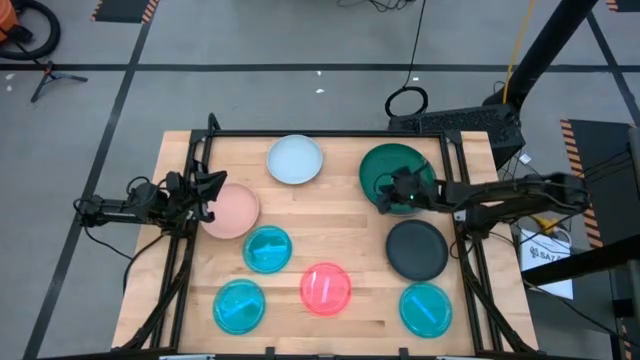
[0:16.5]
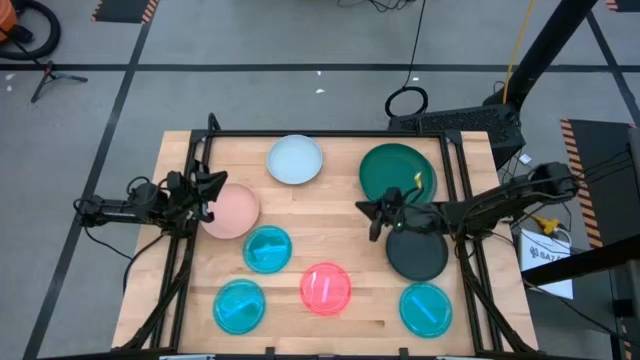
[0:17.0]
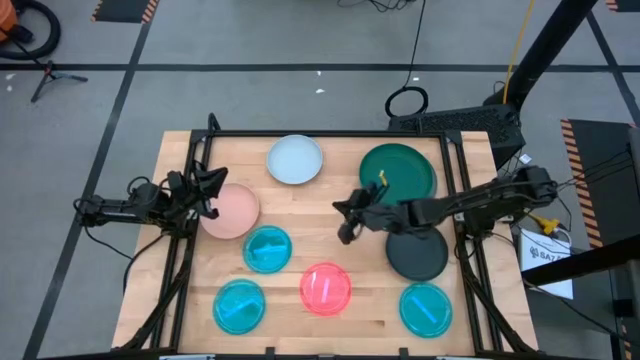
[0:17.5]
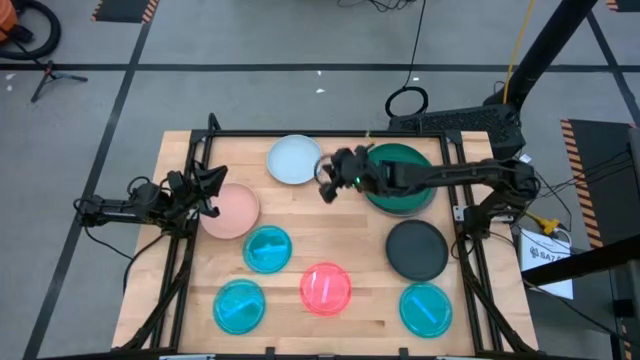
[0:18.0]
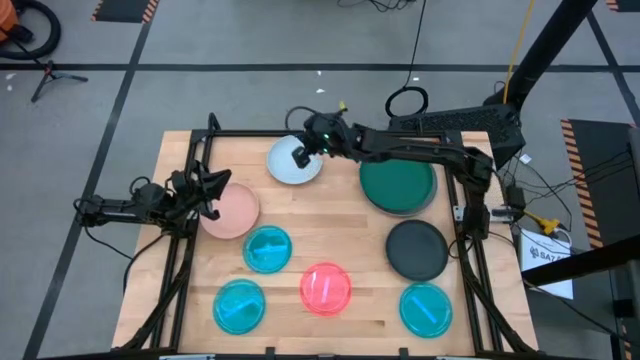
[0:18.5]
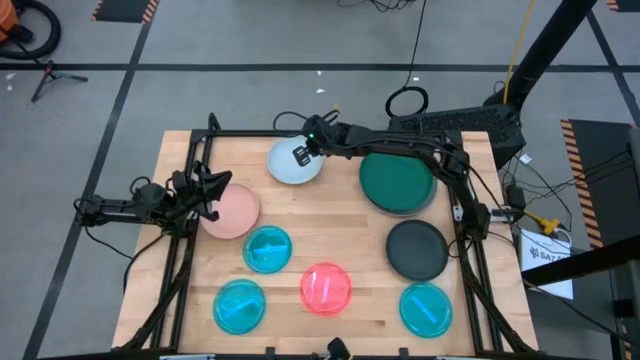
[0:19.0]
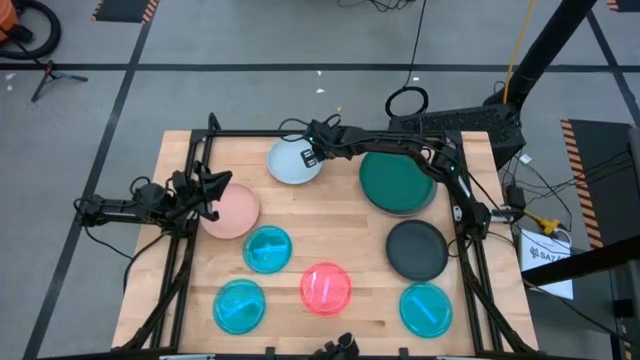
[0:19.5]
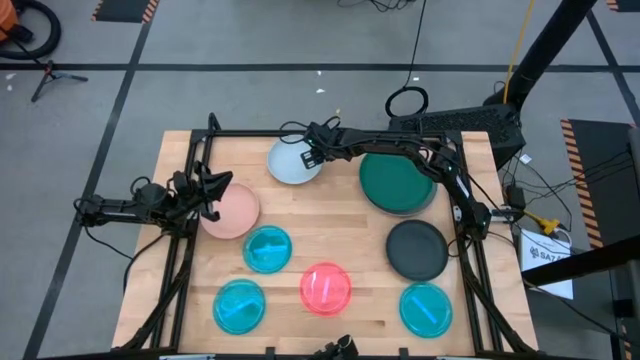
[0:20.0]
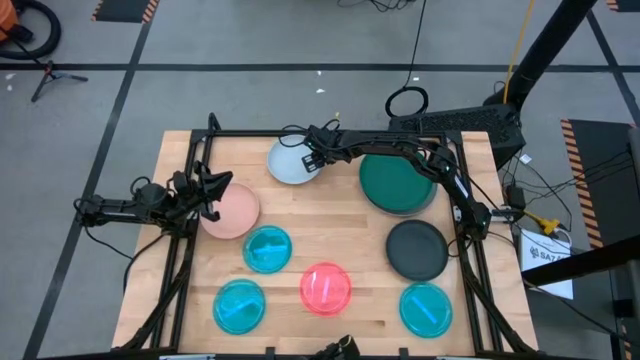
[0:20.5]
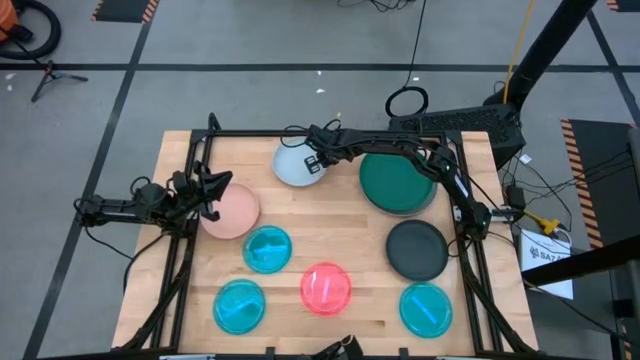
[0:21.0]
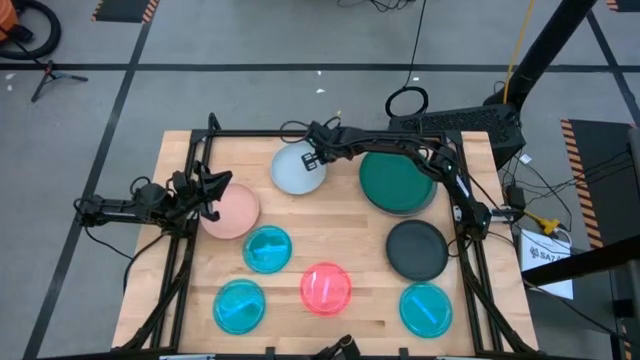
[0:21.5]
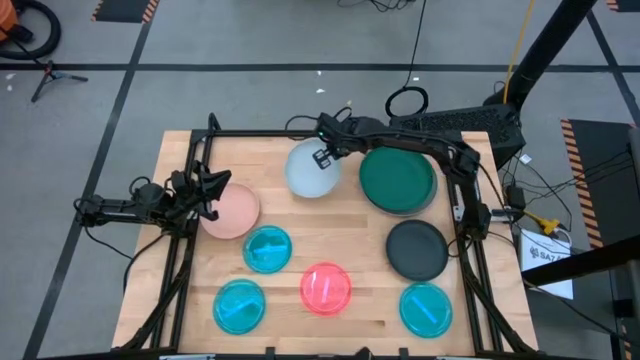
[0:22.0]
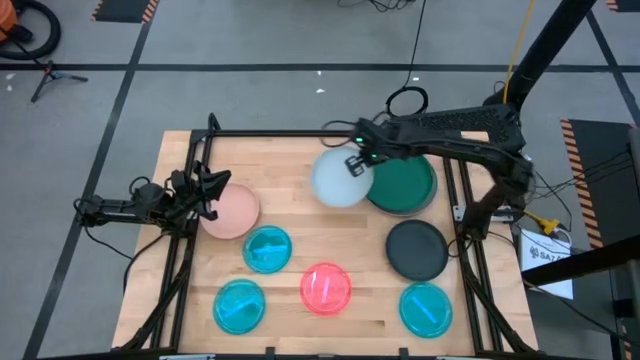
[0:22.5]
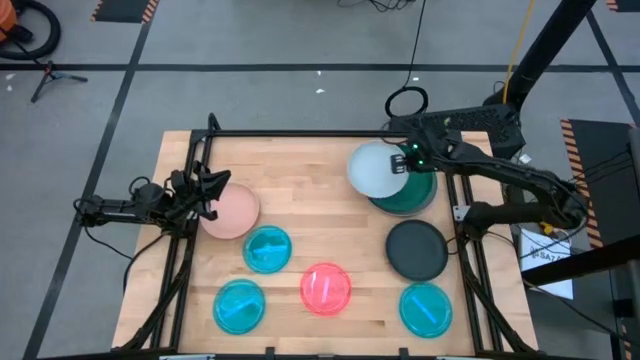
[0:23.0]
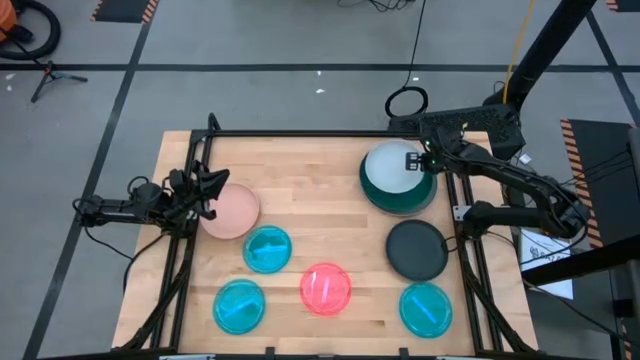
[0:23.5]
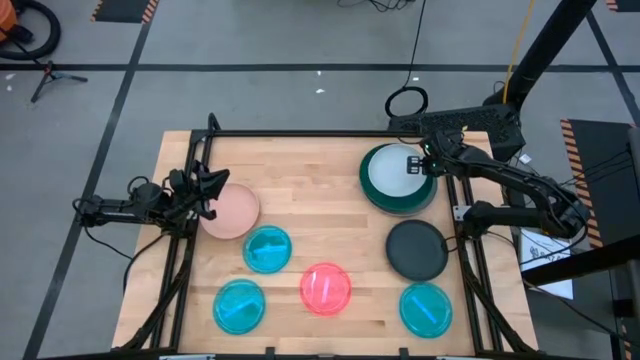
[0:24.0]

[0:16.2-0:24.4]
Task: Stack plastic plates
Stack the white plate on the green plate

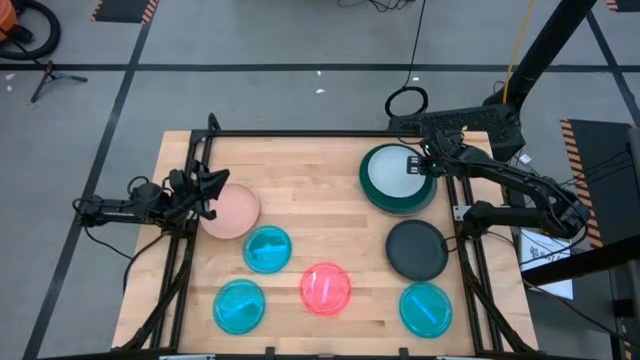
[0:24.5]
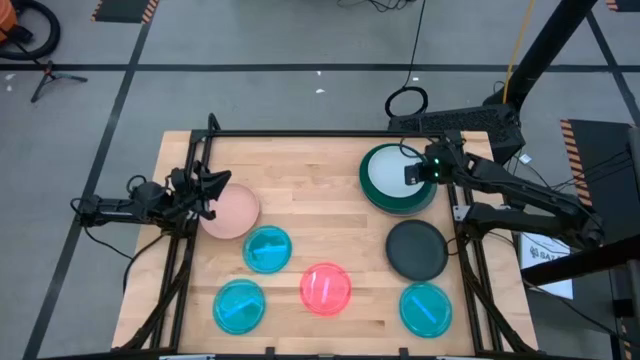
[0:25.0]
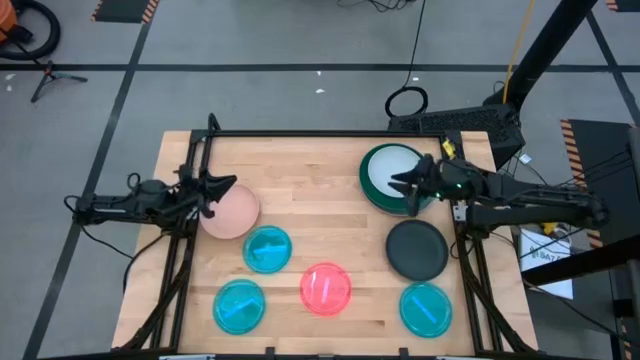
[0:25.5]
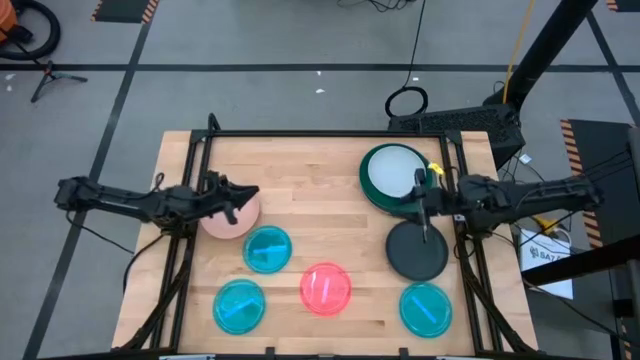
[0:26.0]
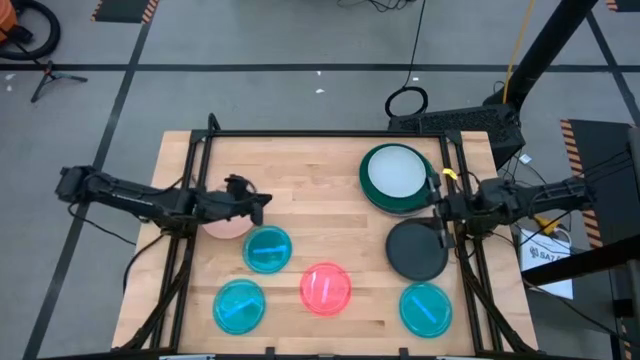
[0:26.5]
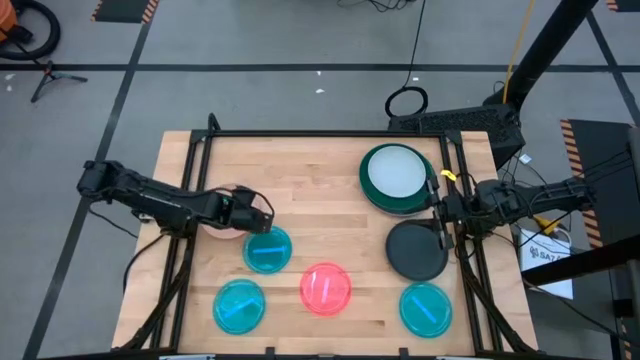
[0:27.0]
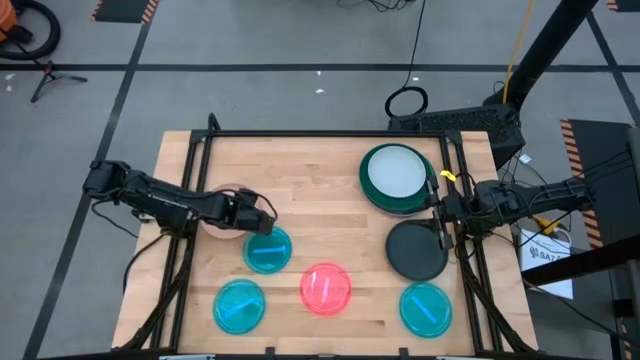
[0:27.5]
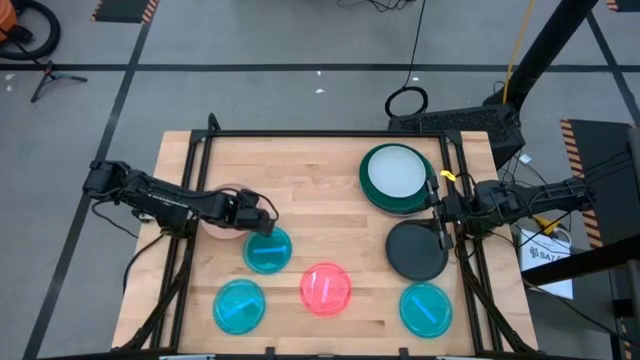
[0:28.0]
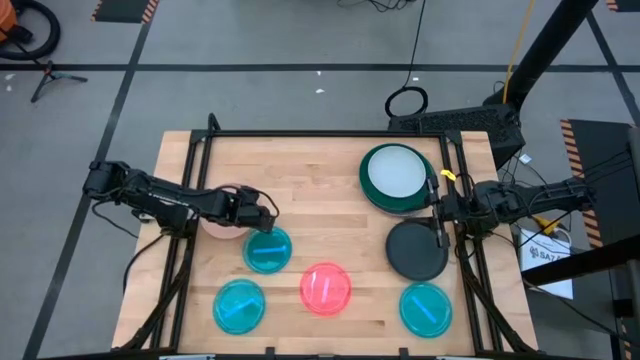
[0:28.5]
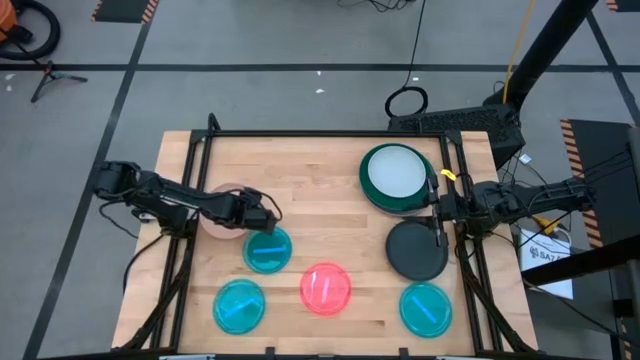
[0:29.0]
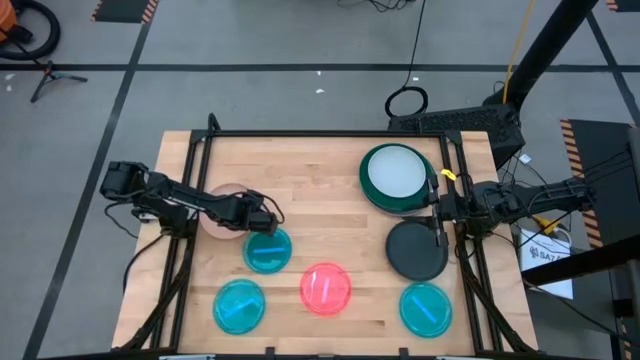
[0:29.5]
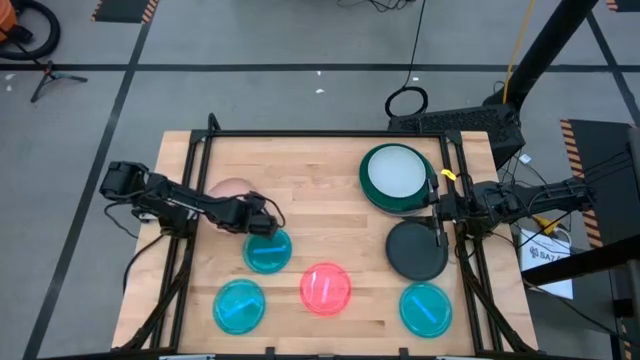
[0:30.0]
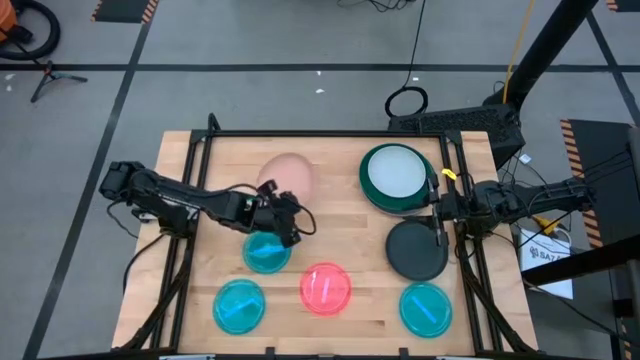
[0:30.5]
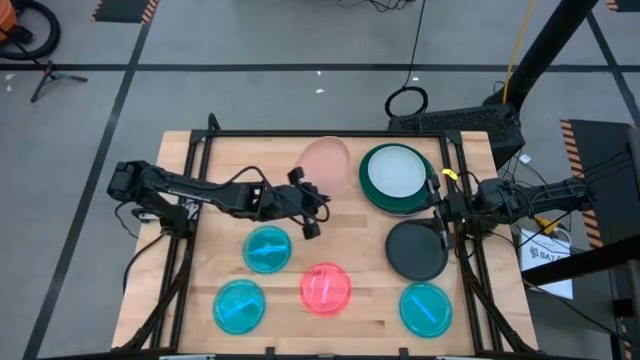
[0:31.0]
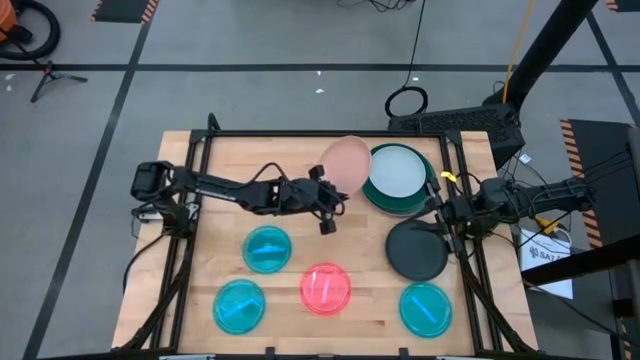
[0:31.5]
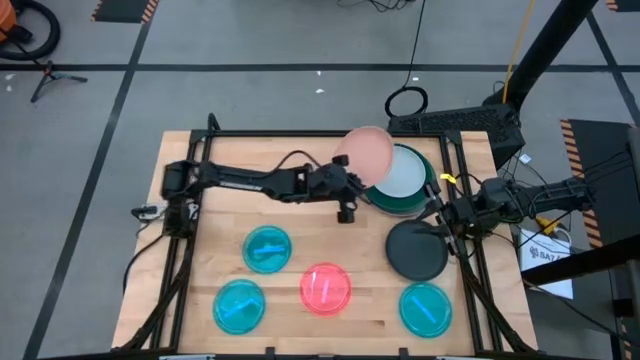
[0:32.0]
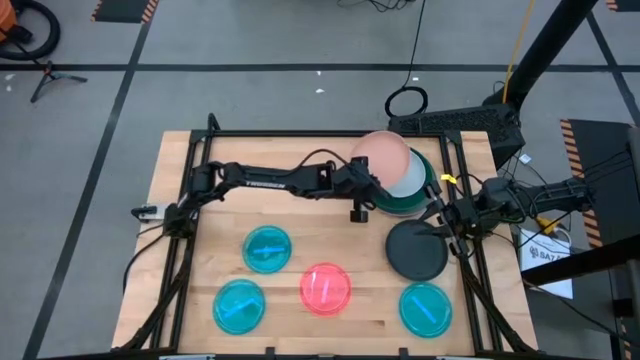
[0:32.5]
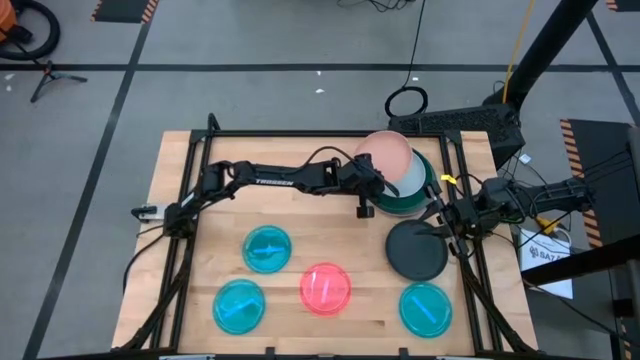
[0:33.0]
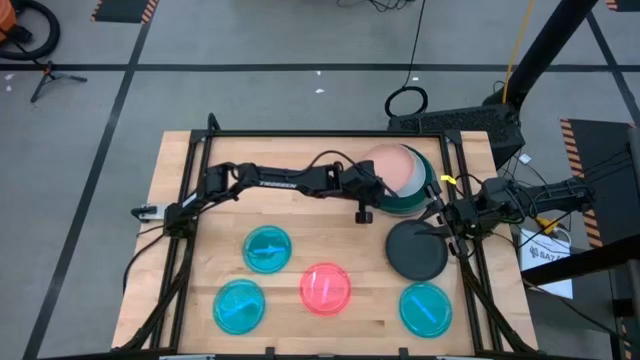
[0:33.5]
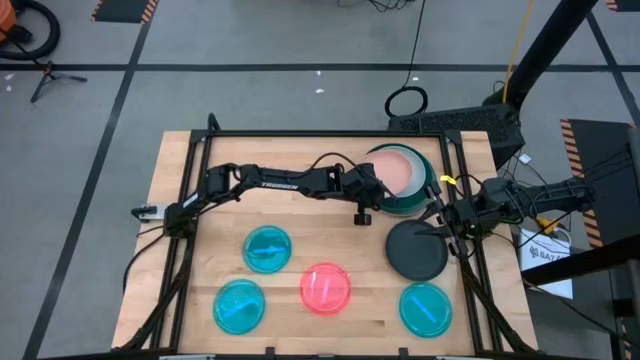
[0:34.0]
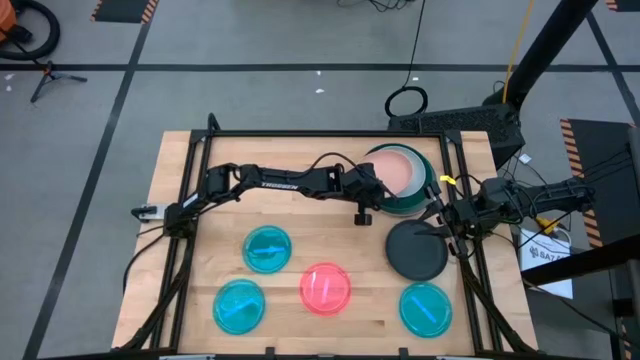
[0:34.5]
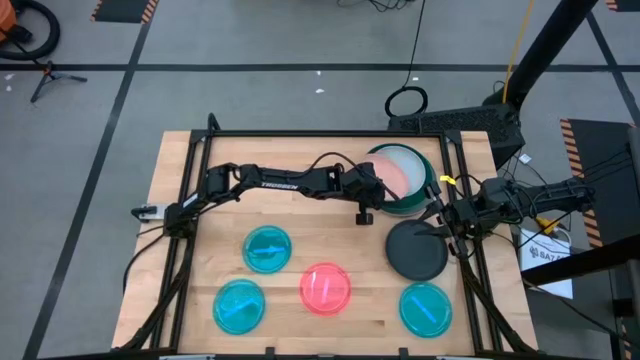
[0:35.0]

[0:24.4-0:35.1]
Stack the brown plate on the white plate

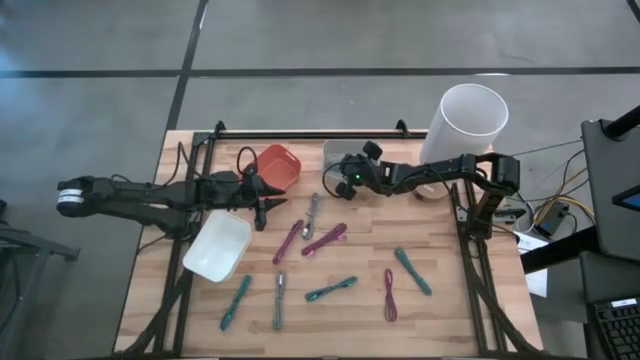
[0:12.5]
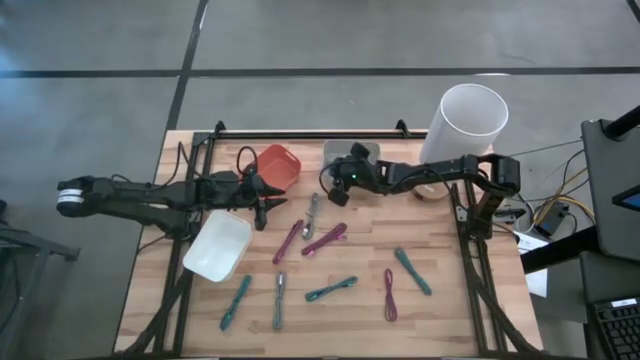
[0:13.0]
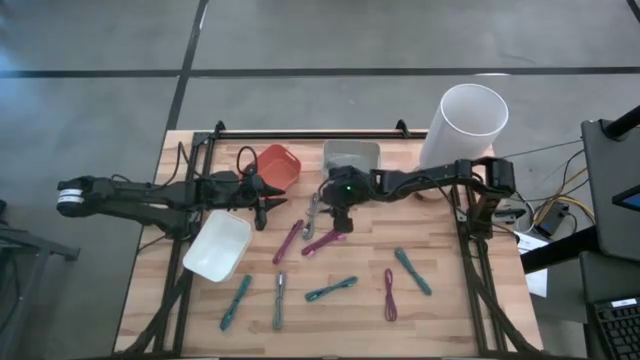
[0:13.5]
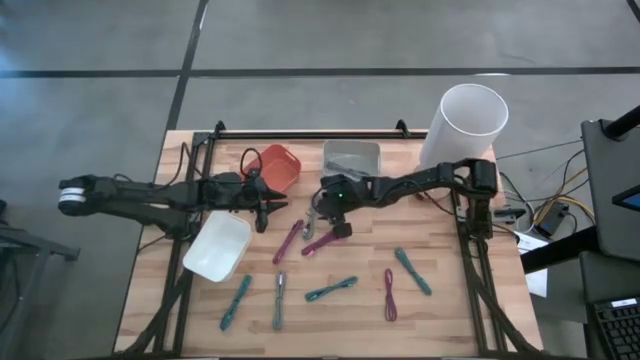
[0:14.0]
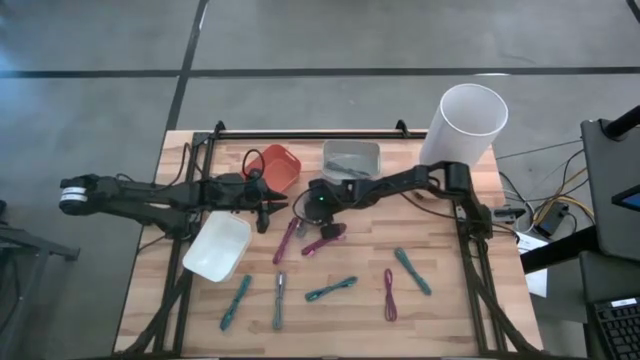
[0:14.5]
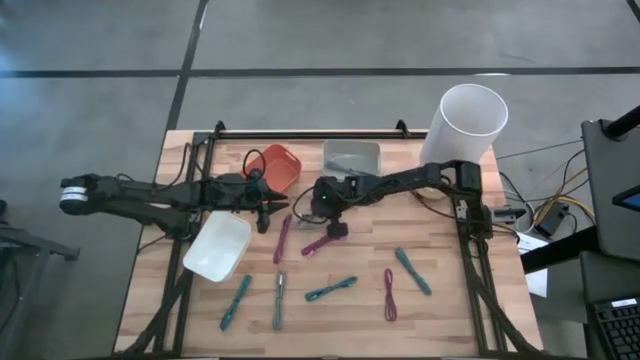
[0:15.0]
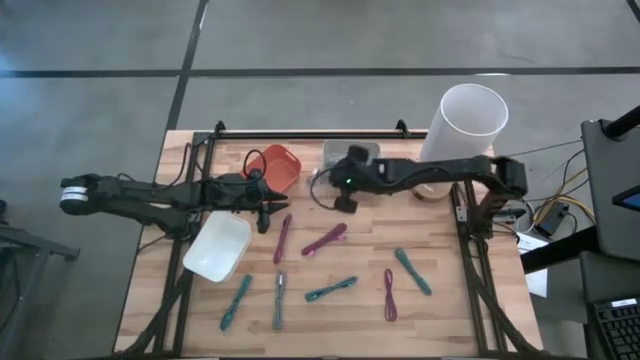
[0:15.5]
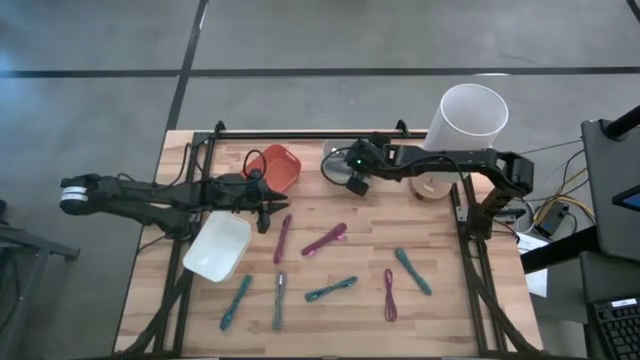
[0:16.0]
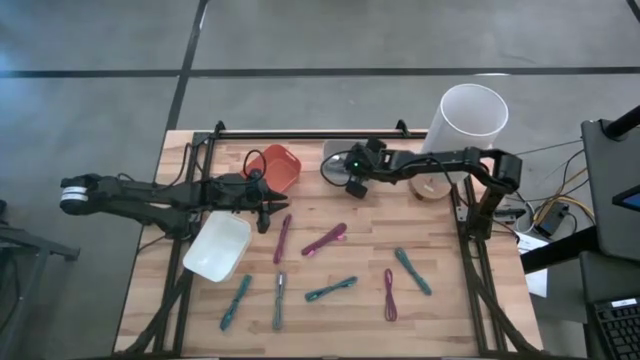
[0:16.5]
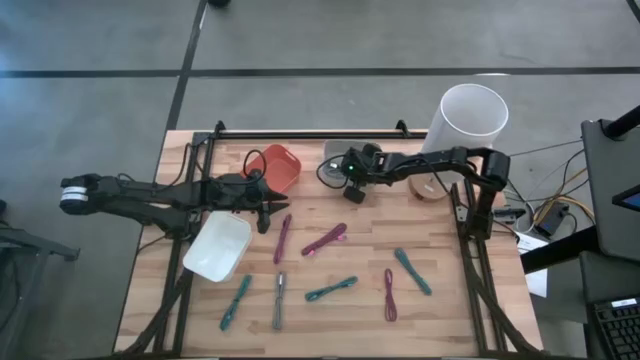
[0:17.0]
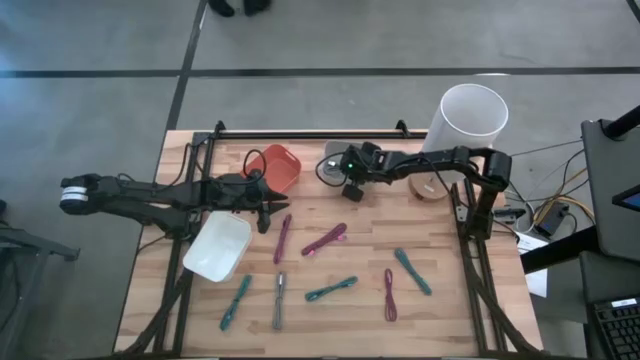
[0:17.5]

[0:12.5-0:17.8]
Task: Pick & Place USB Port
Put the top white USB cable into the gray bin
